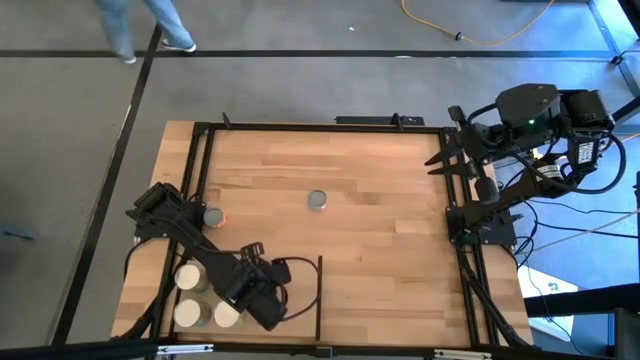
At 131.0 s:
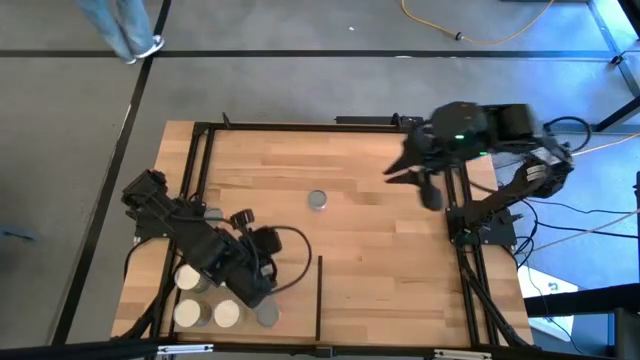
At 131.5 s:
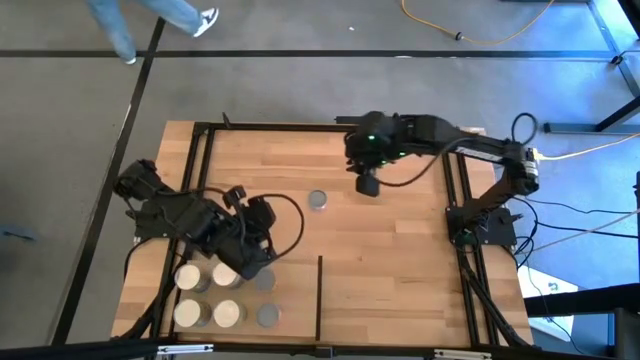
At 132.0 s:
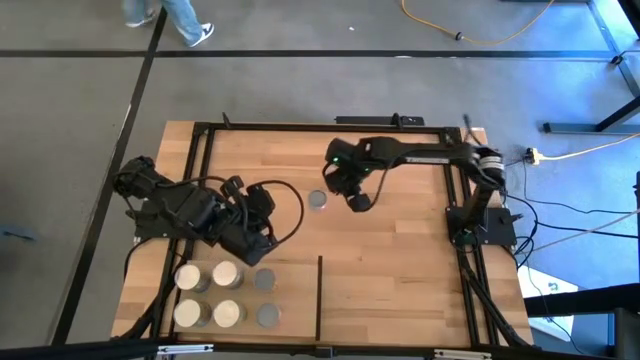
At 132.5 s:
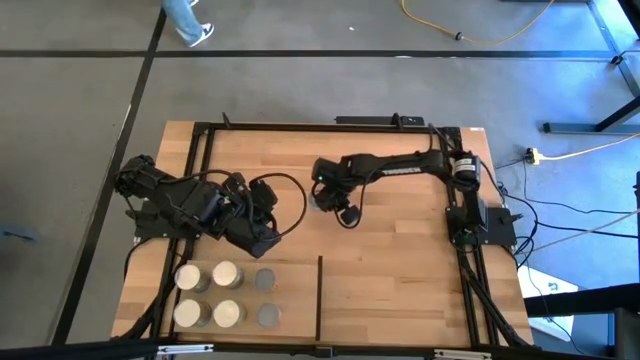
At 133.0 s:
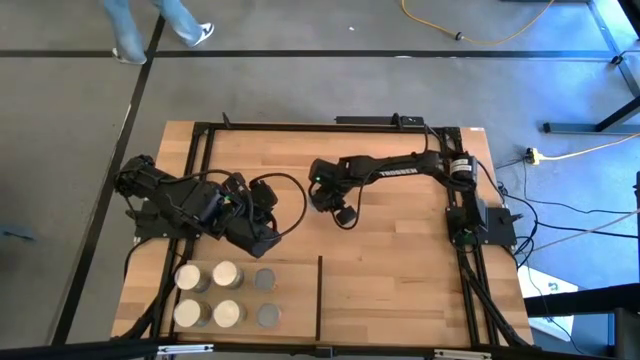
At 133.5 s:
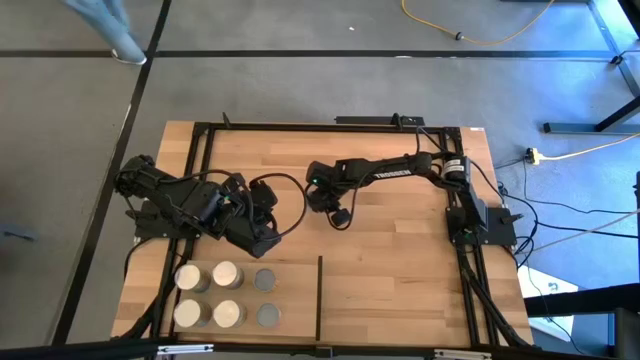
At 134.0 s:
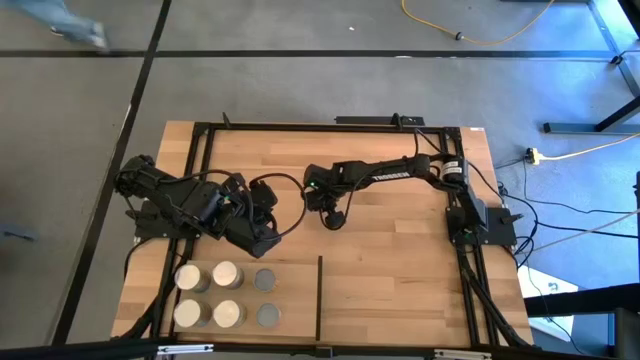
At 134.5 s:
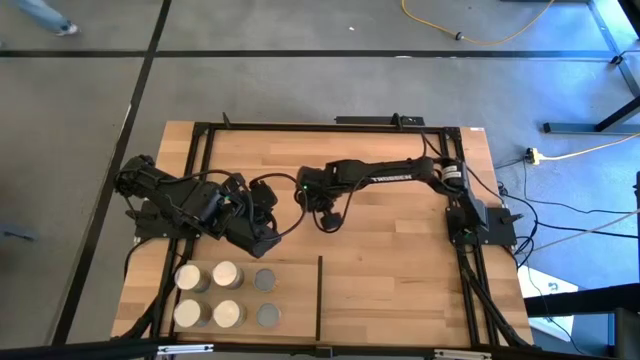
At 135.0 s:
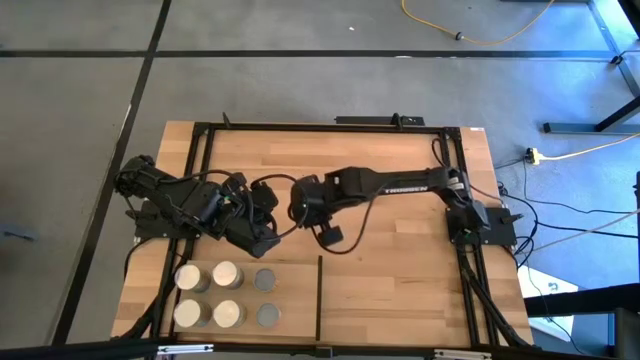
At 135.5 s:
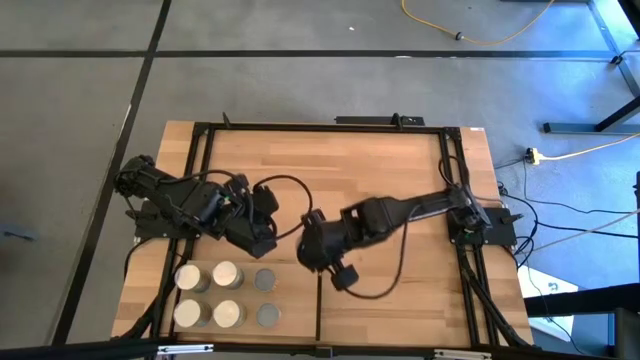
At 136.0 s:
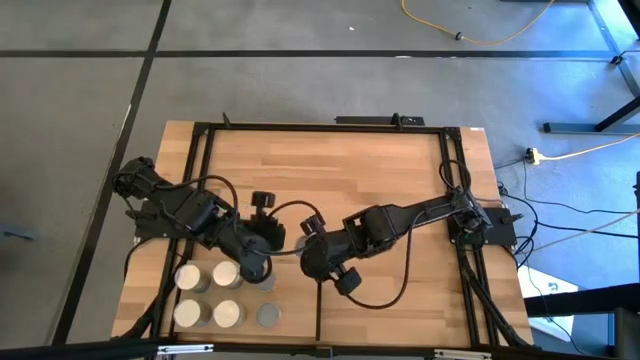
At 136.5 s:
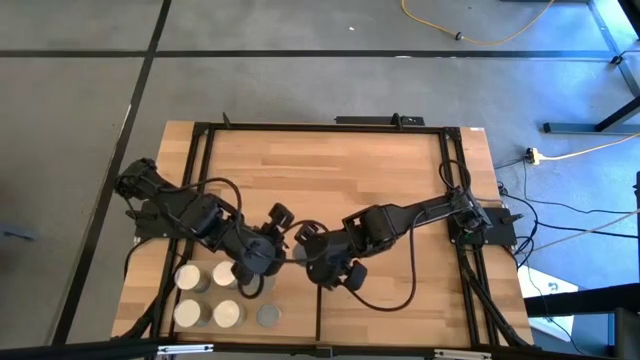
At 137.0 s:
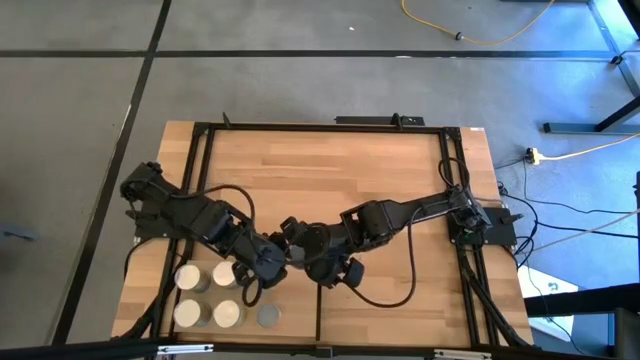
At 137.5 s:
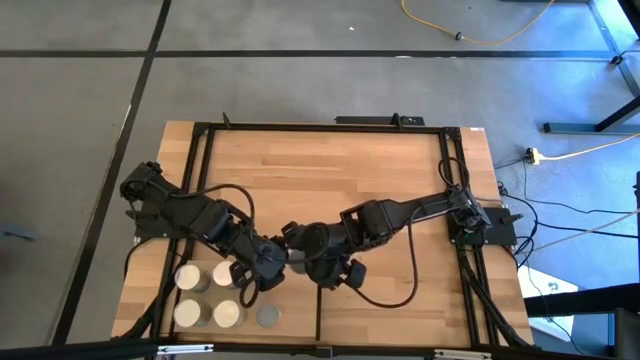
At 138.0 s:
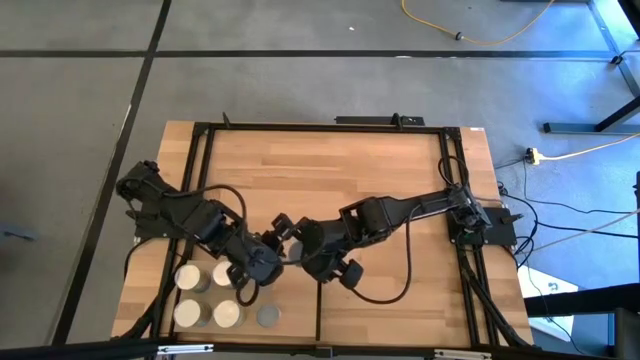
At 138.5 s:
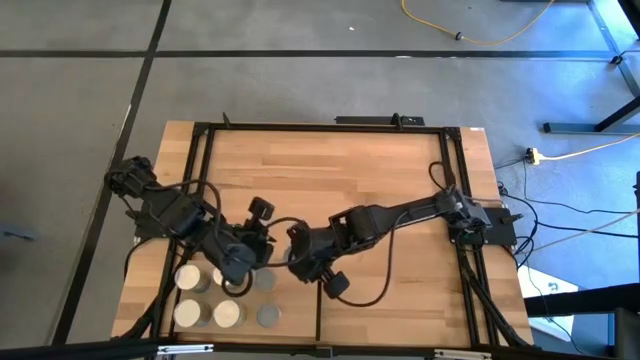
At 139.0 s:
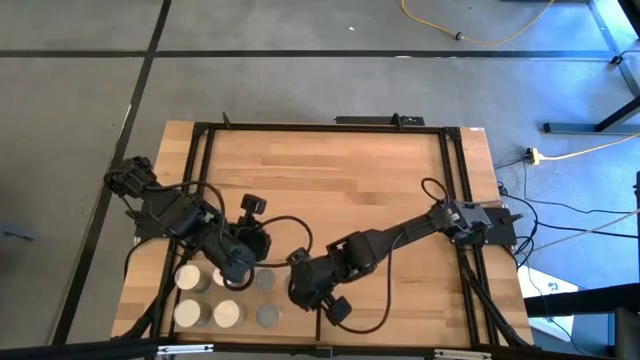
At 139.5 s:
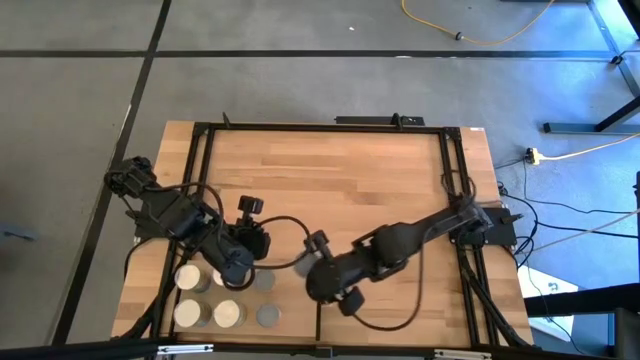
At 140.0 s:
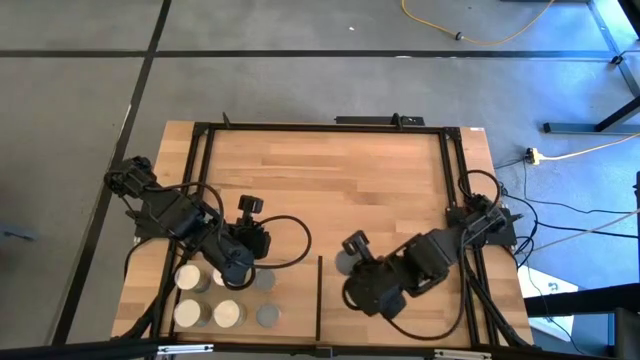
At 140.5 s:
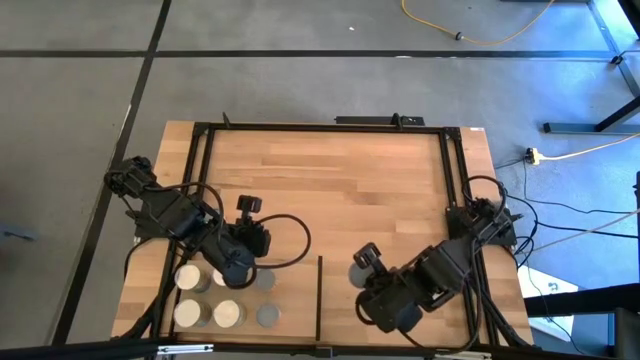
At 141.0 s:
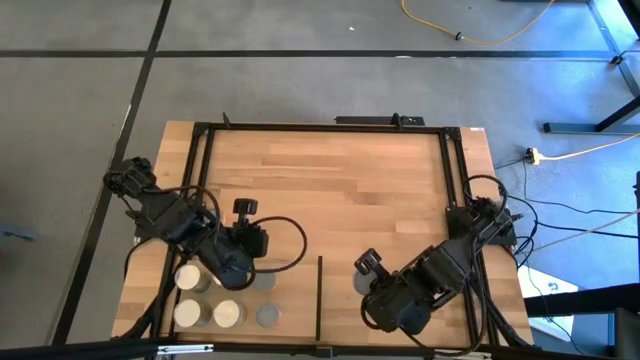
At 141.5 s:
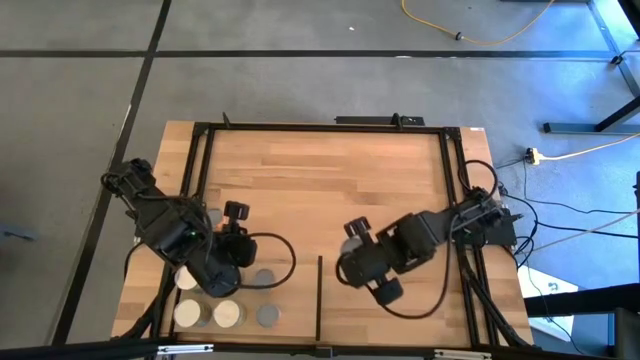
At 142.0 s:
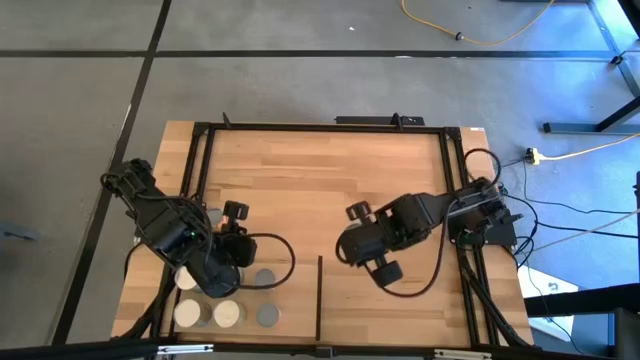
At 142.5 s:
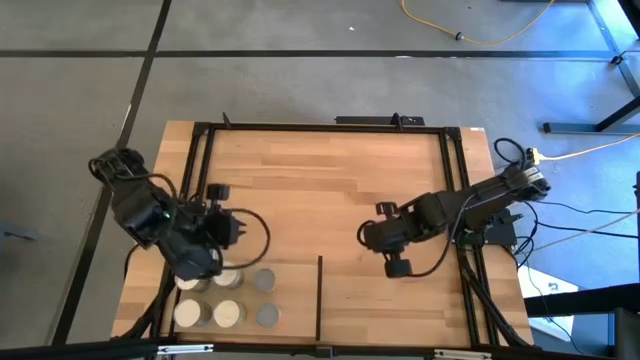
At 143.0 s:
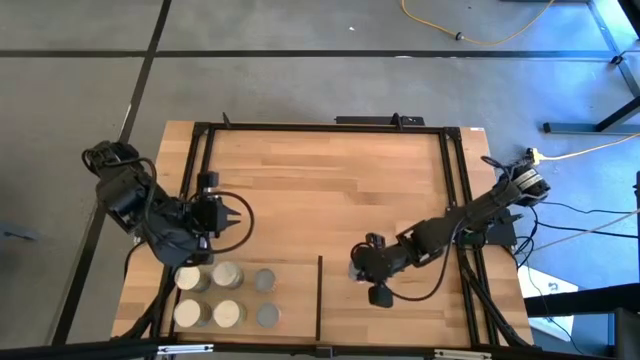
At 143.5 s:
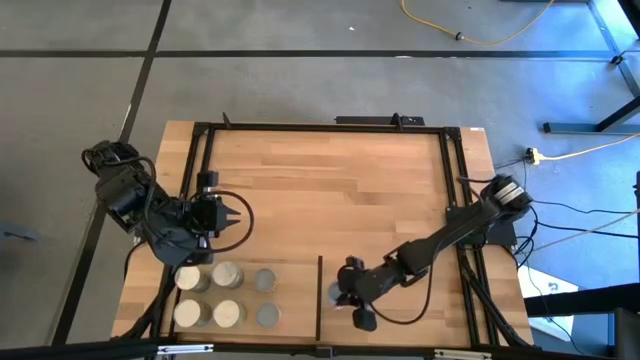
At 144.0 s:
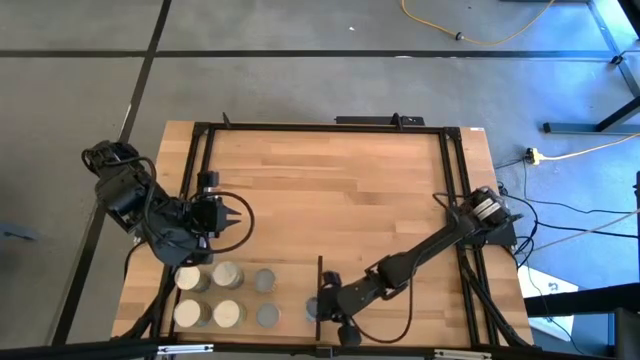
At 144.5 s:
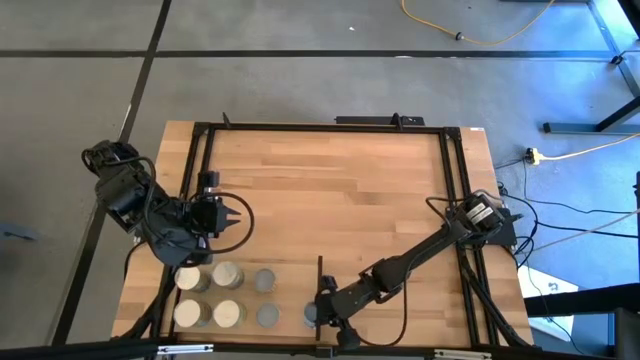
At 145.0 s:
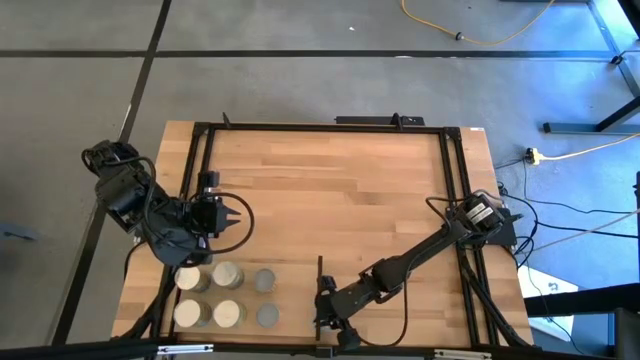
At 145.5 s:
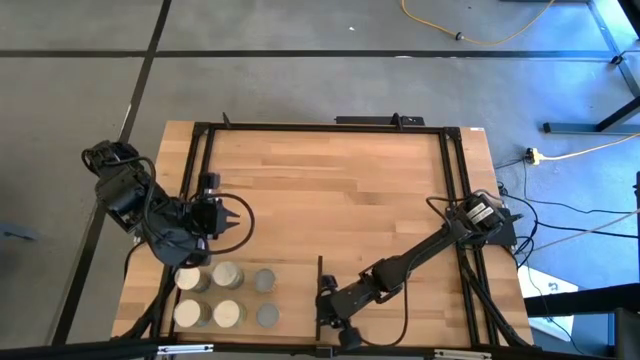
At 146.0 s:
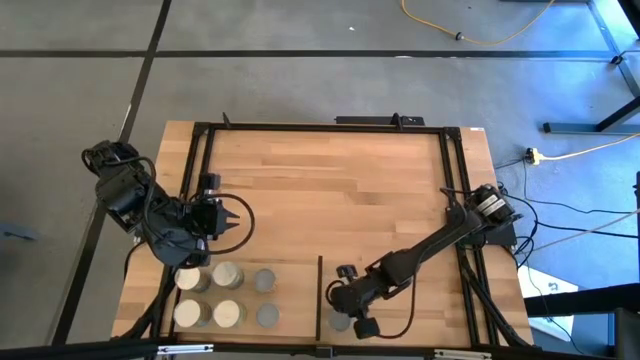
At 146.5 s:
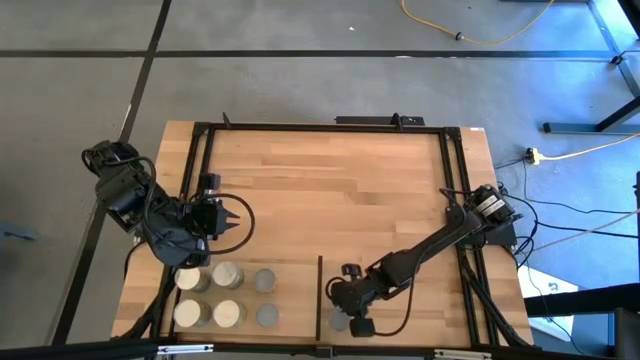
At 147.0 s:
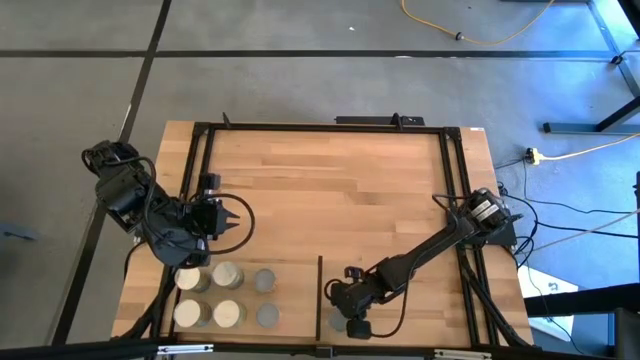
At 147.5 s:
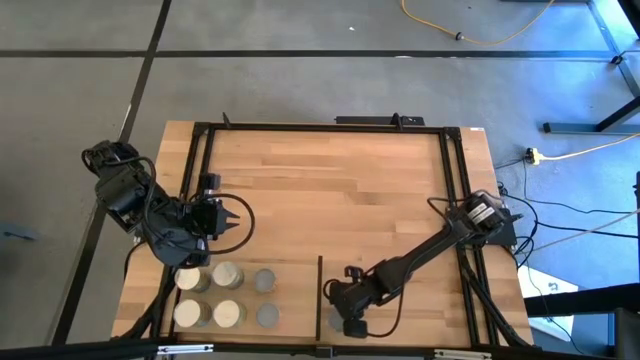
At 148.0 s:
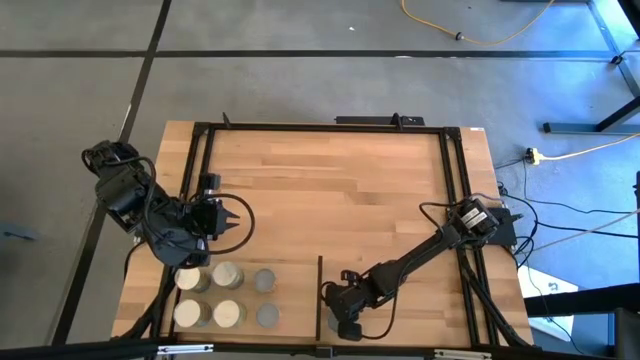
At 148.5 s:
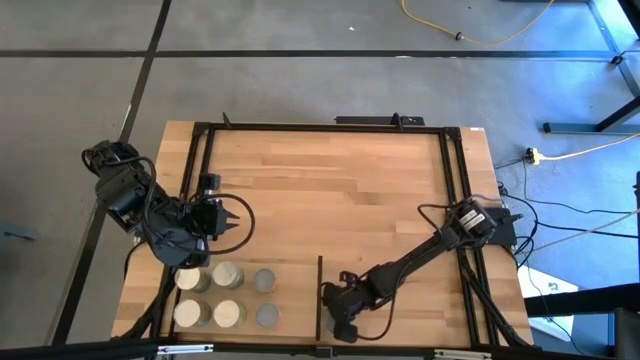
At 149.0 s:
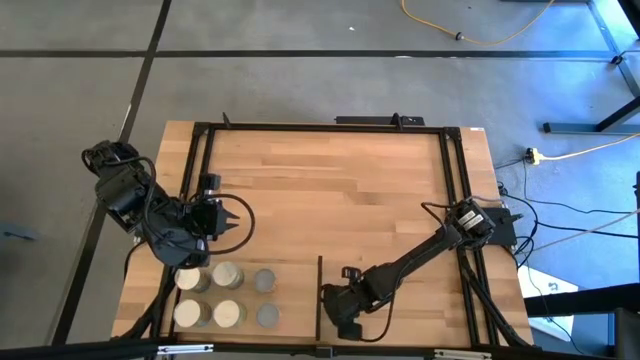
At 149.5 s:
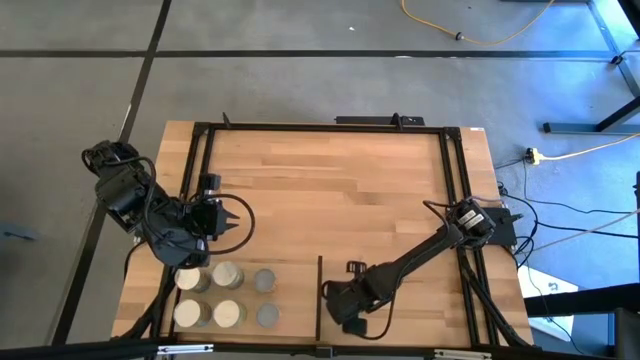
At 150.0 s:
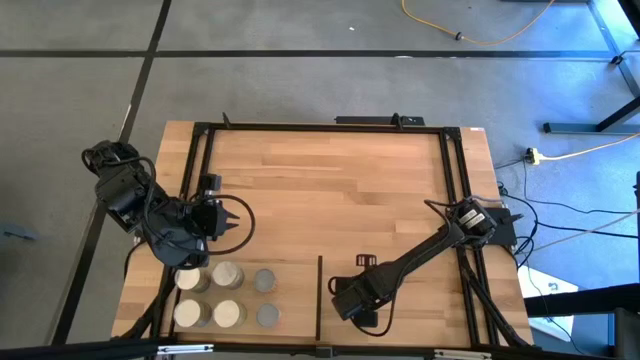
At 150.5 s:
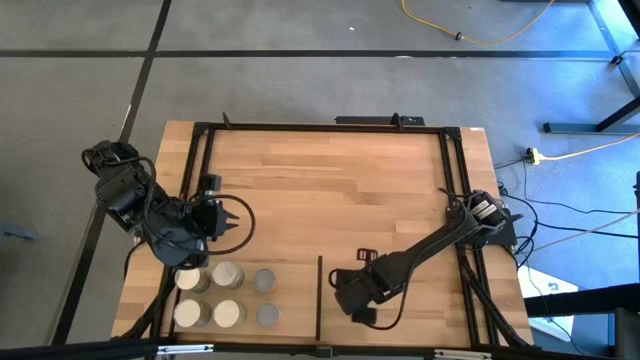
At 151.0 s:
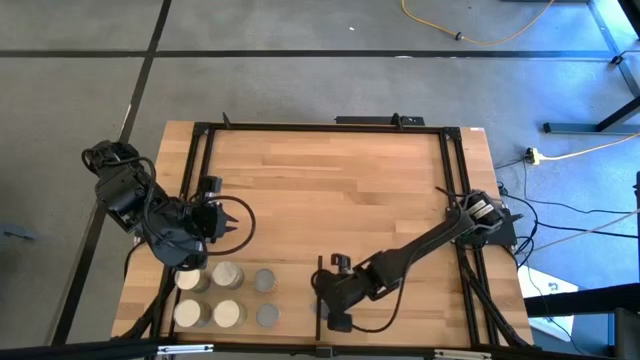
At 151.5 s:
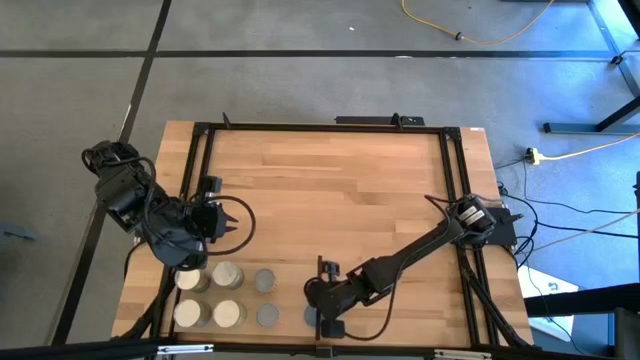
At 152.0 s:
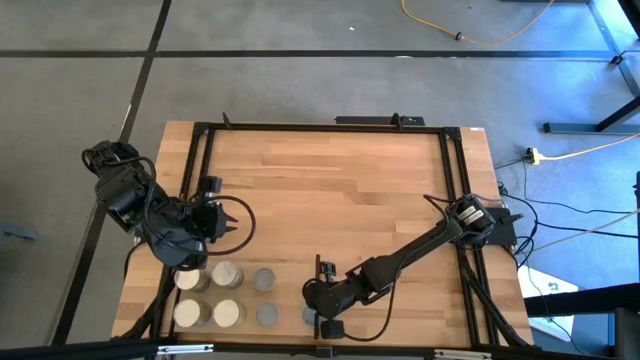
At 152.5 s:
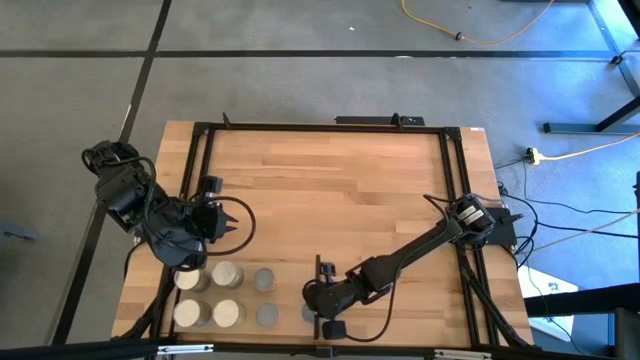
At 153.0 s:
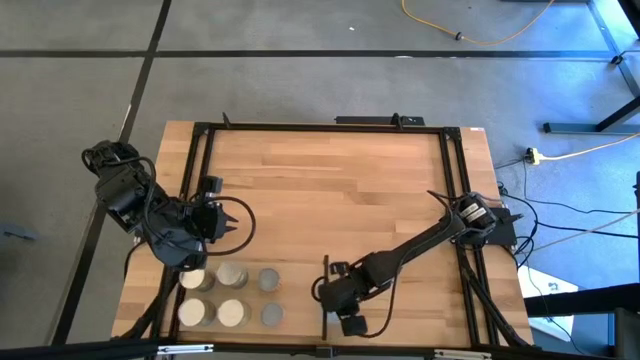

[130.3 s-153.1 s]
Task: Pick and place cans onto a shelf
Put the canned tuna on the shelf
